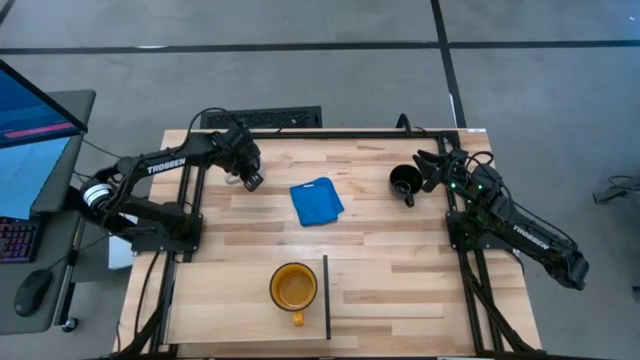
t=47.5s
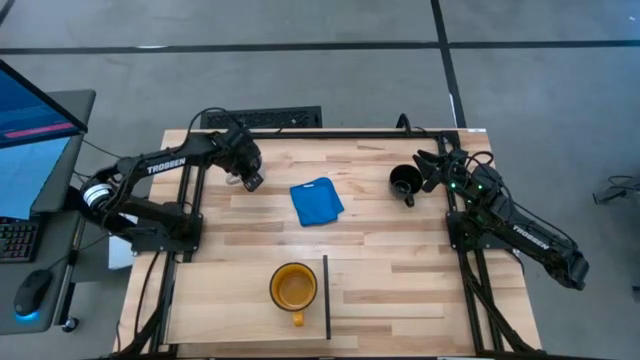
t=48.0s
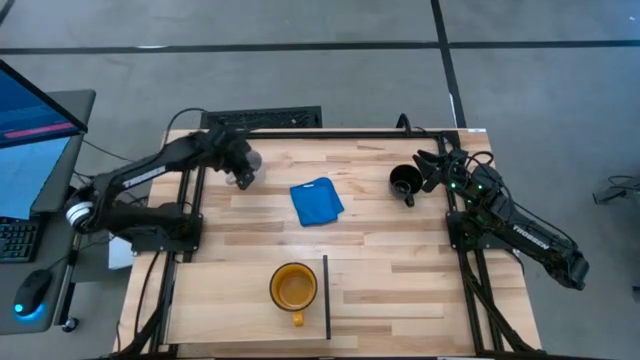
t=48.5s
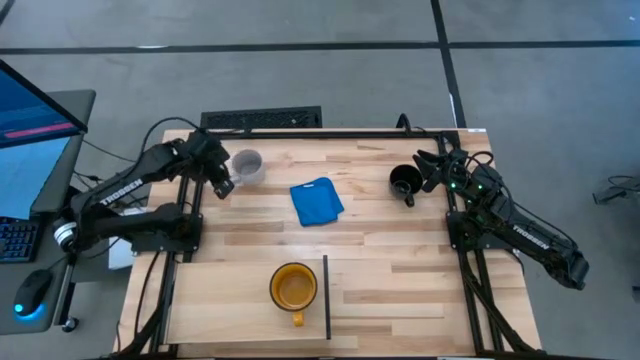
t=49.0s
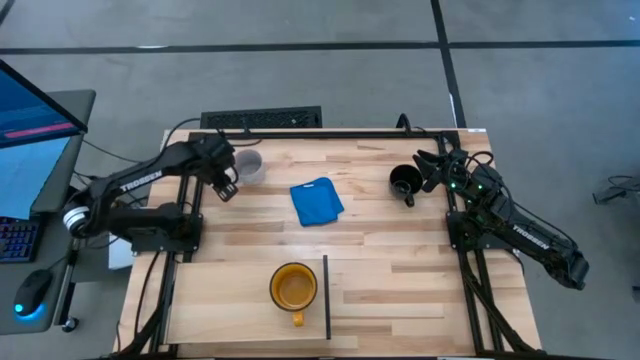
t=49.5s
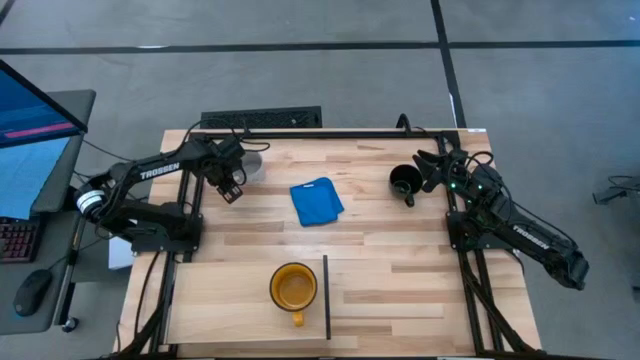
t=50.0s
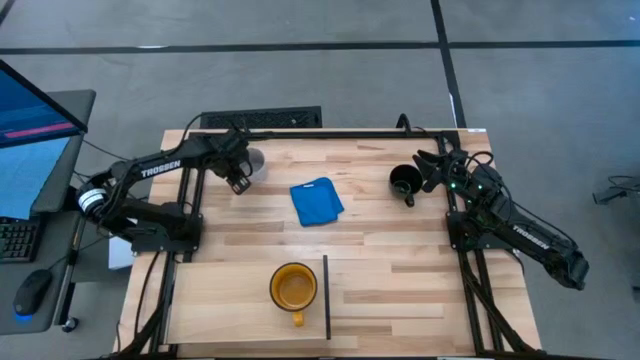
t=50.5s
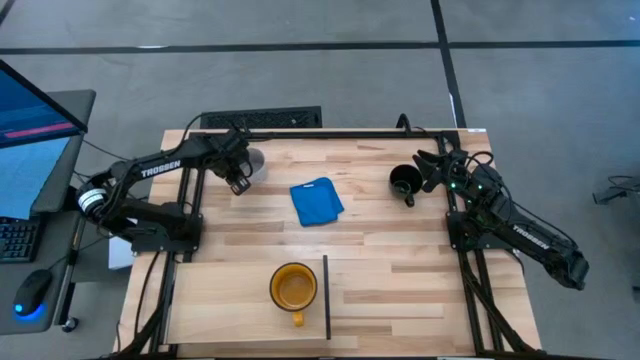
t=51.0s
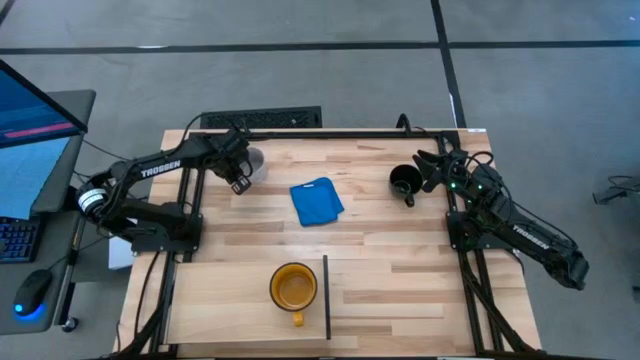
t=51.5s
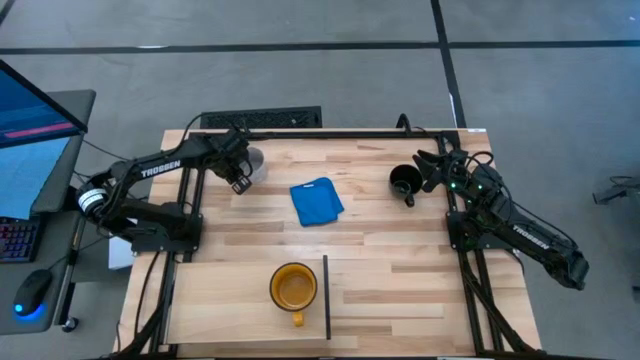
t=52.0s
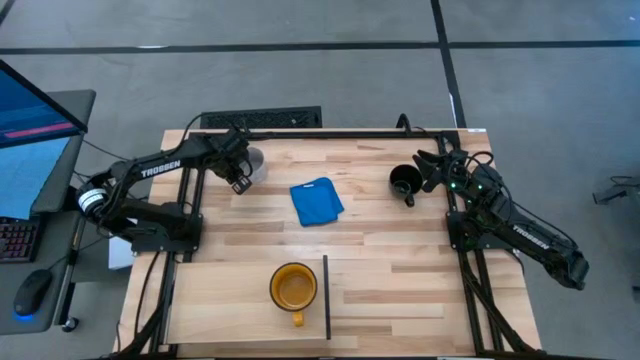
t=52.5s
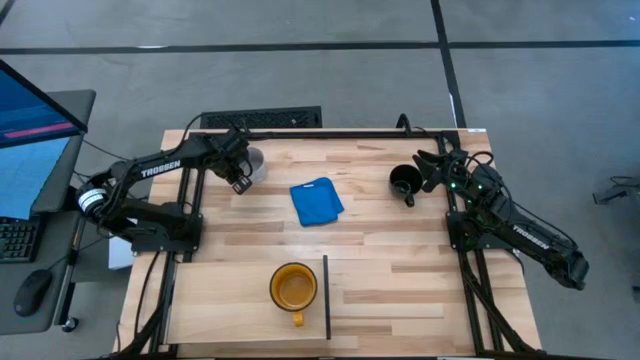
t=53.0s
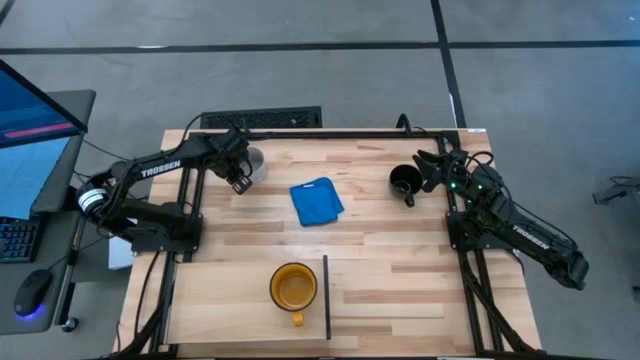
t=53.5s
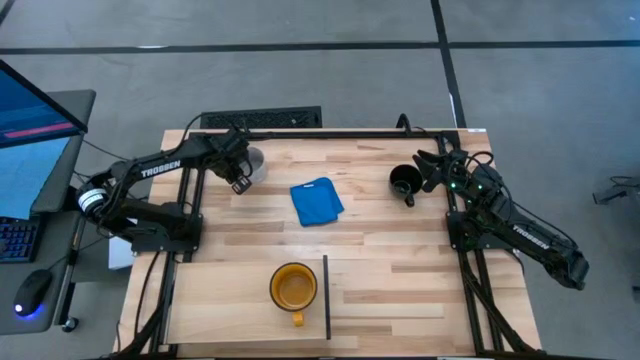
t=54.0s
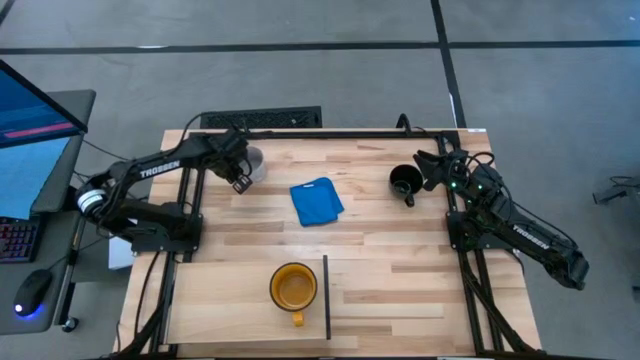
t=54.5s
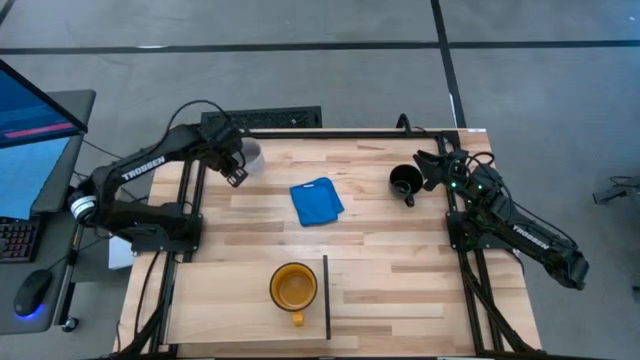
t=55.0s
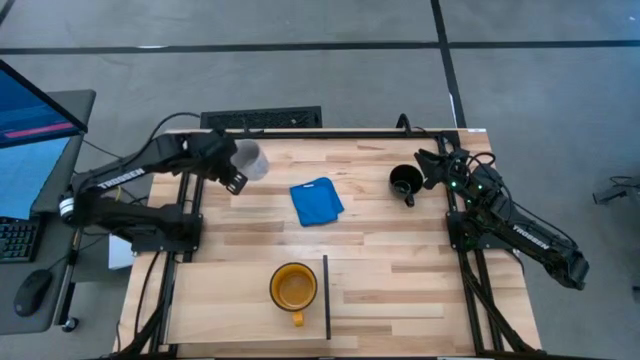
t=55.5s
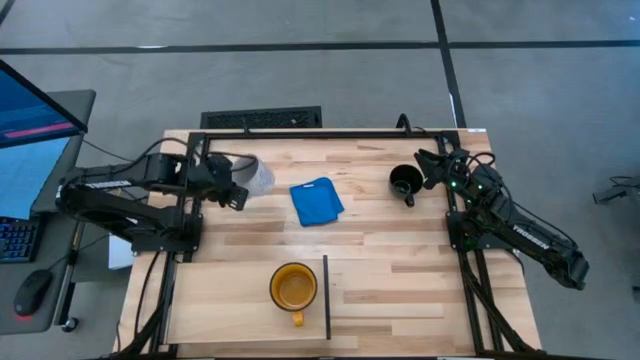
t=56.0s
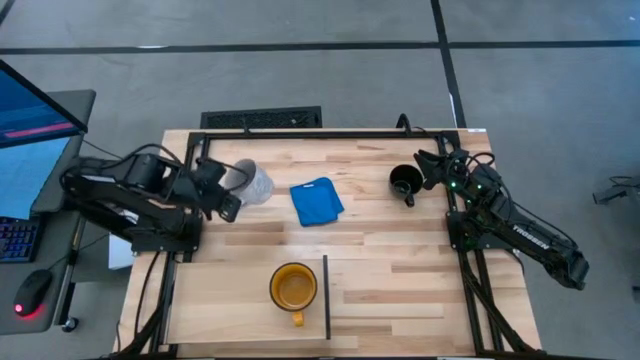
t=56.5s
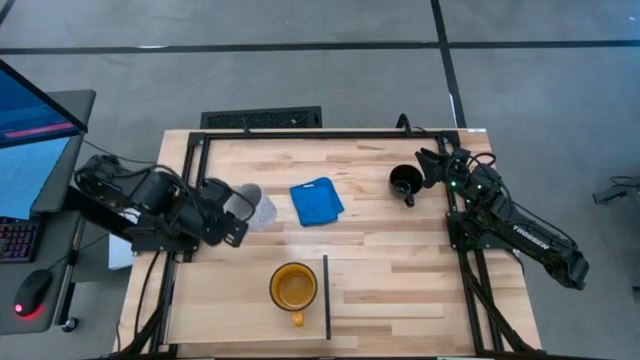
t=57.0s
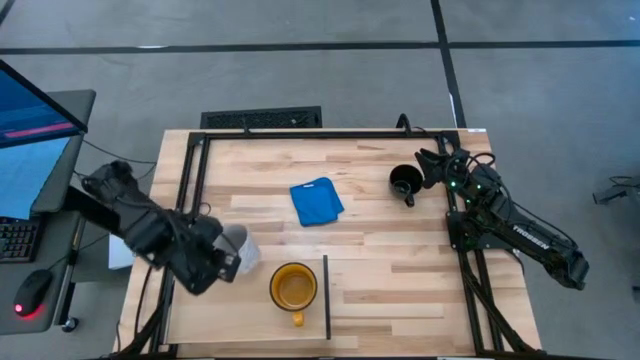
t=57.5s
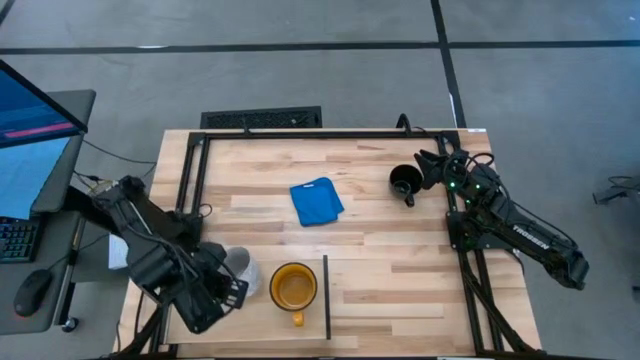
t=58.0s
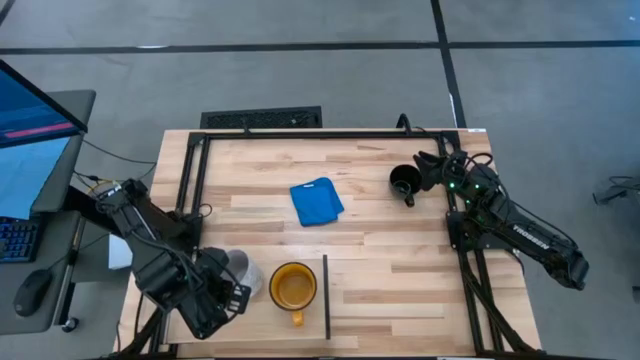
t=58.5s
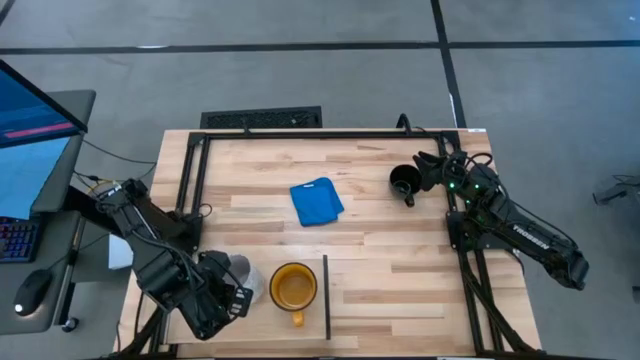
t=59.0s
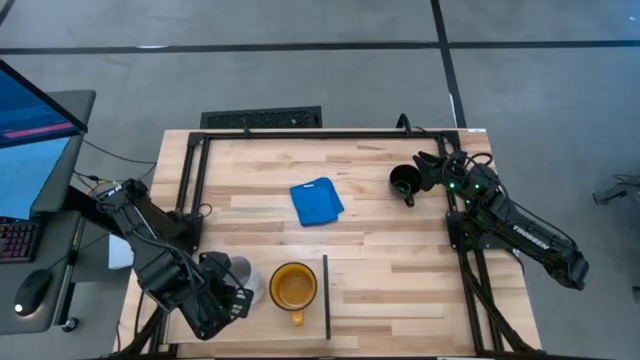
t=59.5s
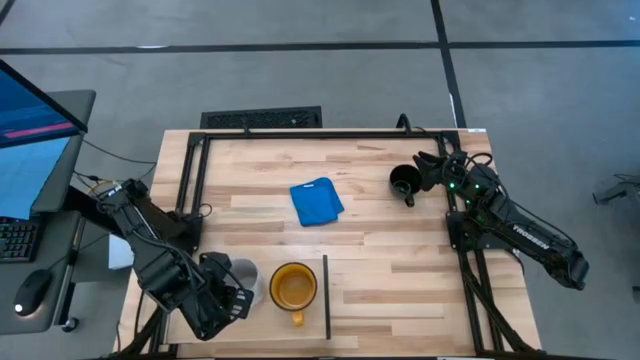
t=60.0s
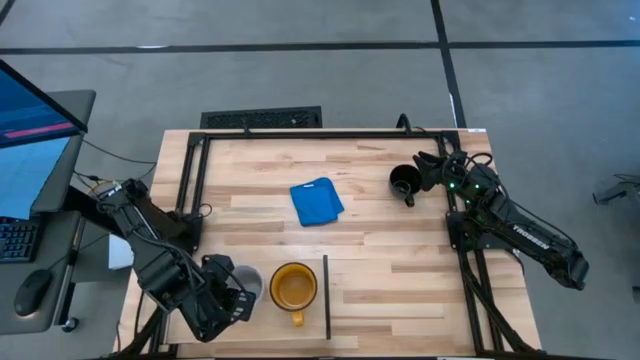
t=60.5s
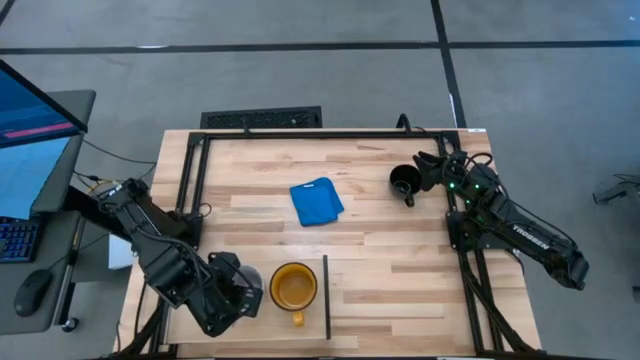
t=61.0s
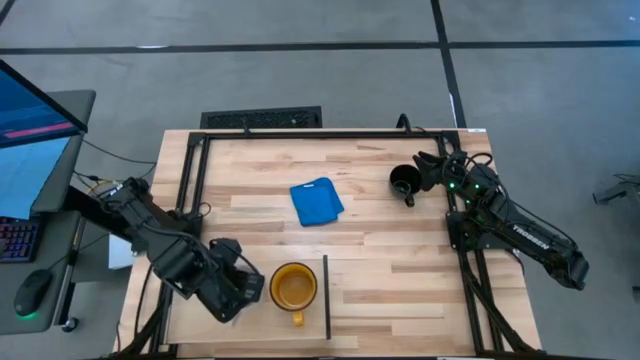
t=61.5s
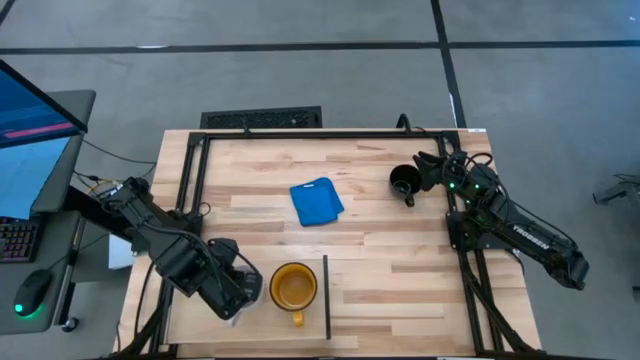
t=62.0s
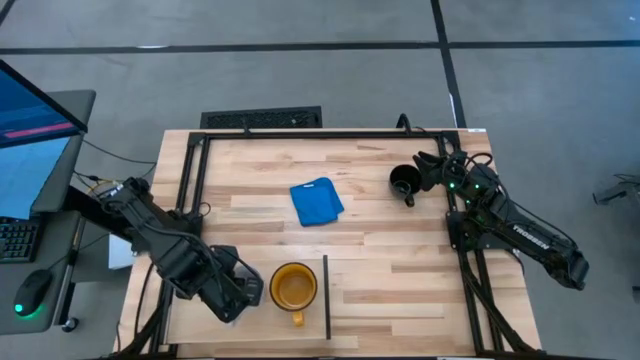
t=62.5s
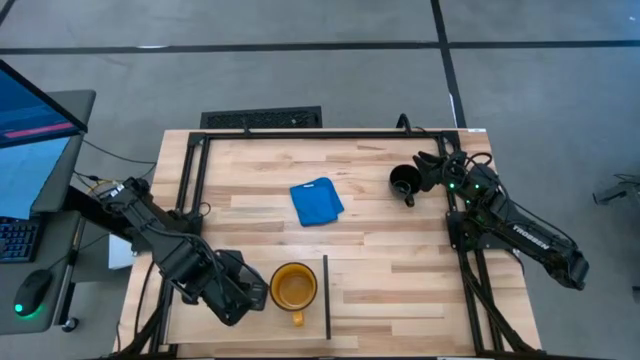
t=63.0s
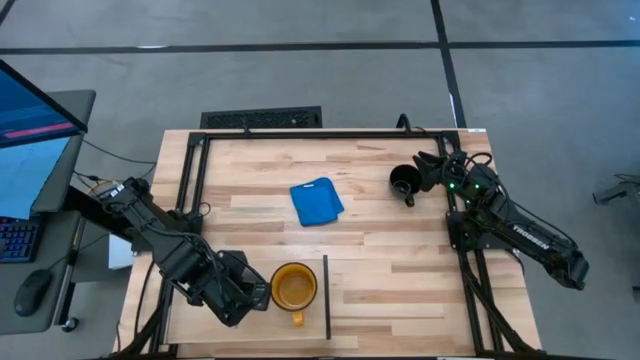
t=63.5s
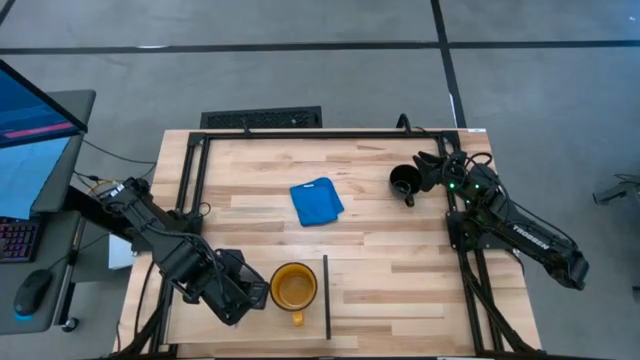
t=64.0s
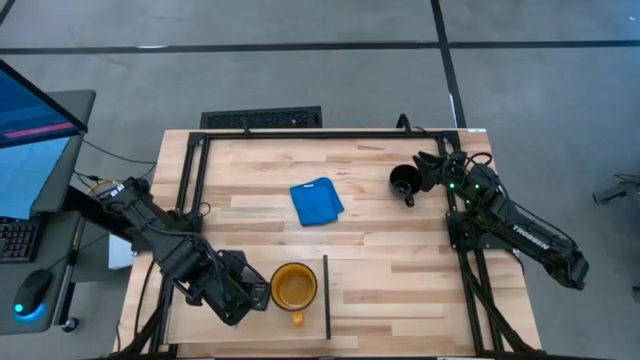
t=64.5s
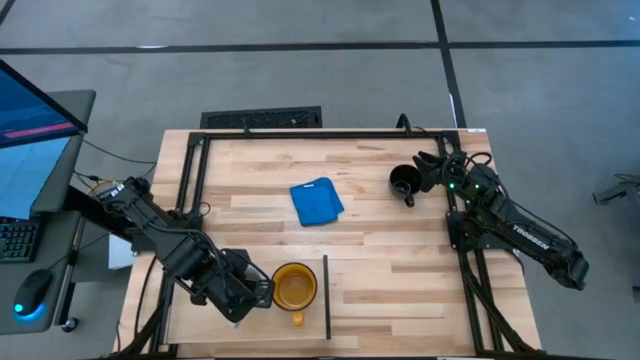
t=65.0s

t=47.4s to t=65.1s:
Task: Stack small to large cups/mugs on shelf
Put the gray mug on the shelf

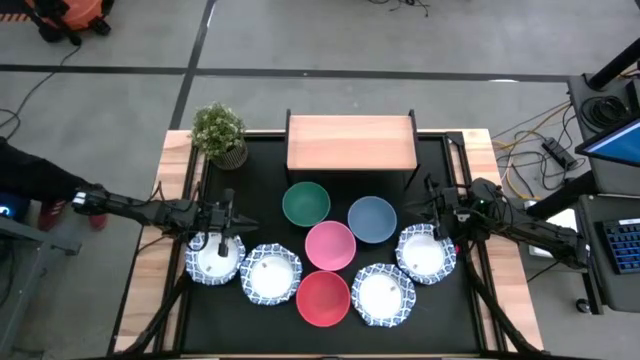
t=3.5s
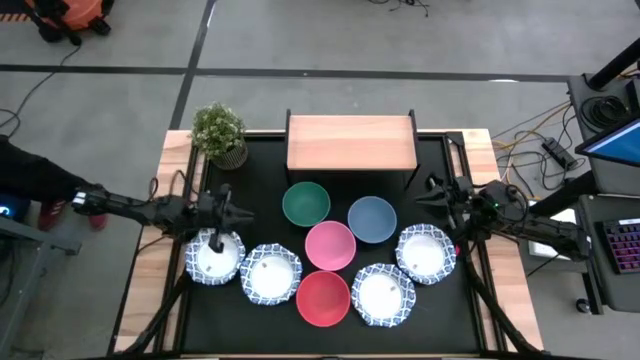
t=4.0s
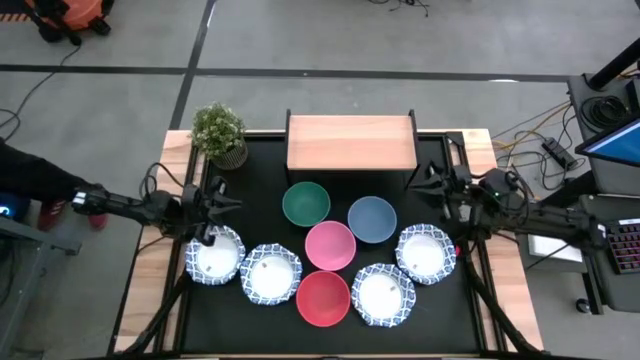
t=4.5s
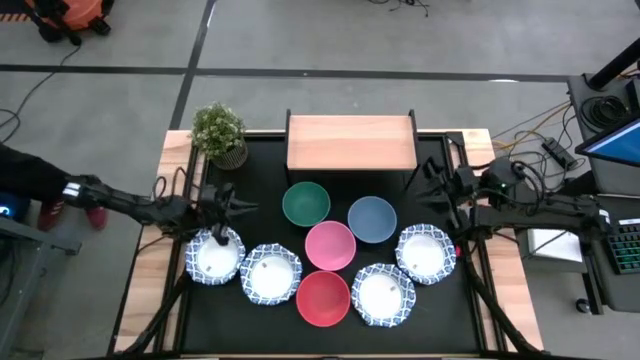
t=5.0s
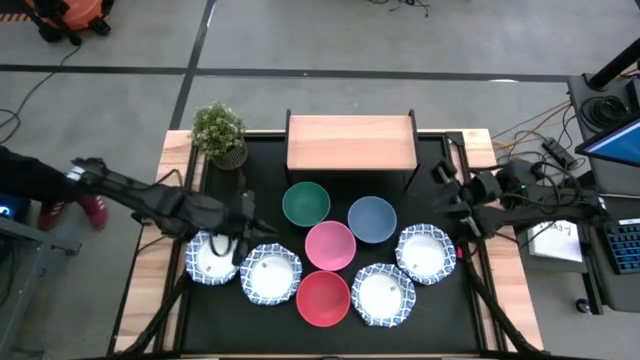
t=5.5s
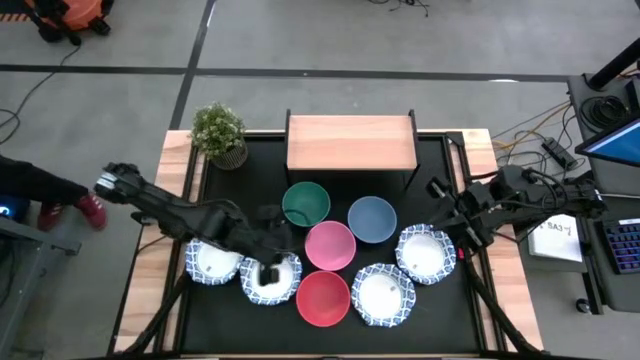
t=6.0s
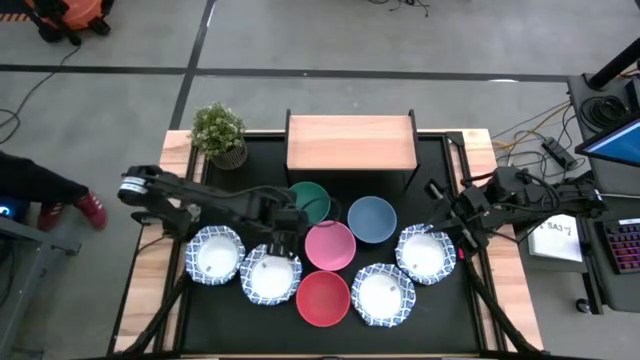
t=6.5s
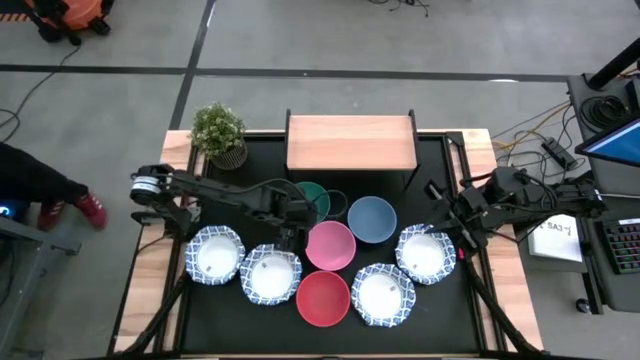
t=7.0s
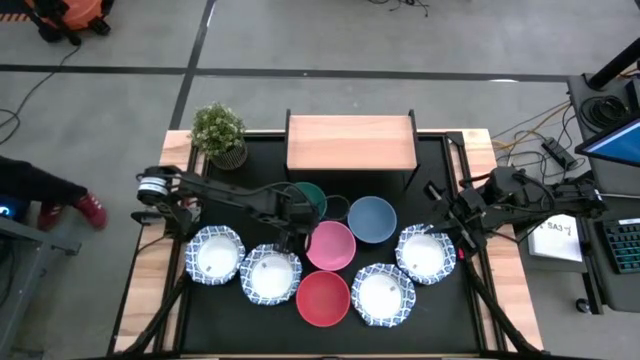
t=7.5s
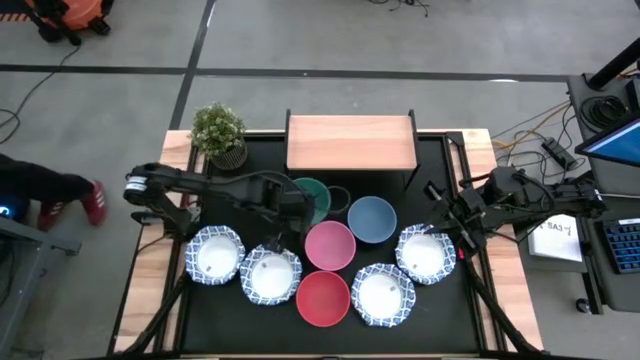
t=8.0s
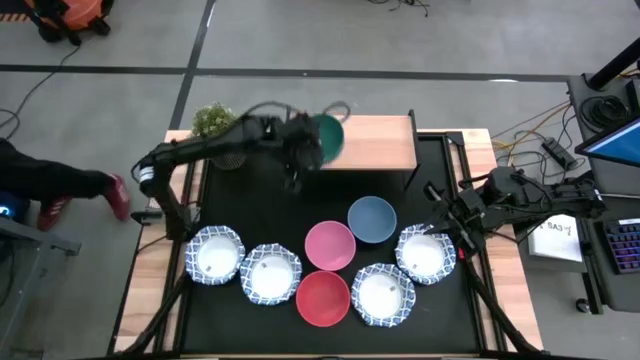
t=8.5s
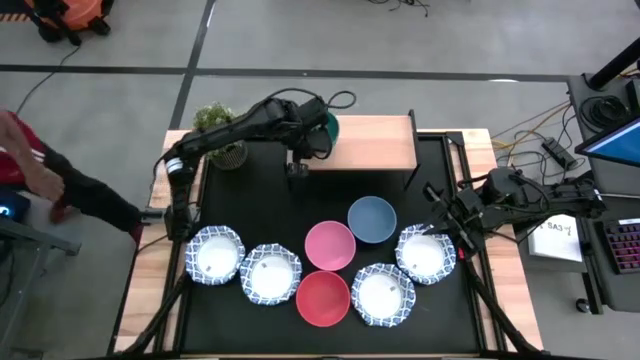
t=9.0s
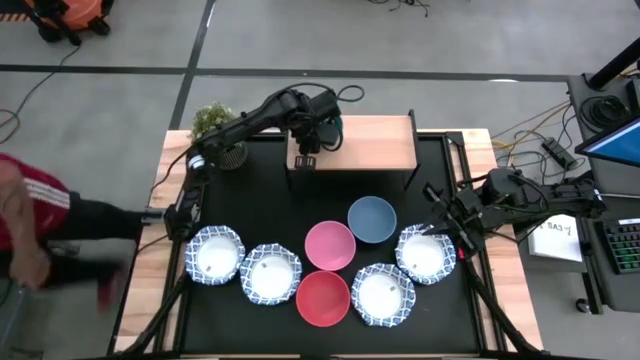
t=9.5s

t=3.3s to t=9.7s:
Task: Place and stack bowls onto a shelf
Put the green plastic bowl on the shelf
